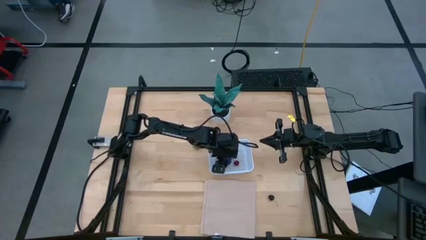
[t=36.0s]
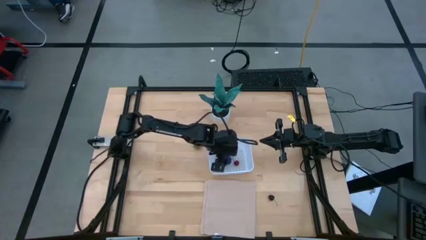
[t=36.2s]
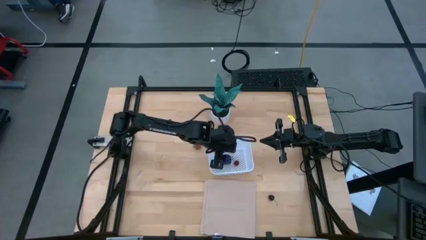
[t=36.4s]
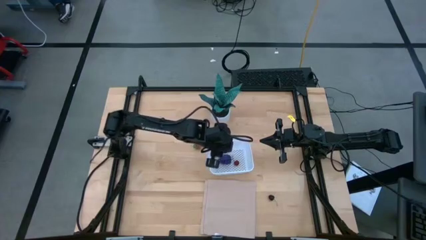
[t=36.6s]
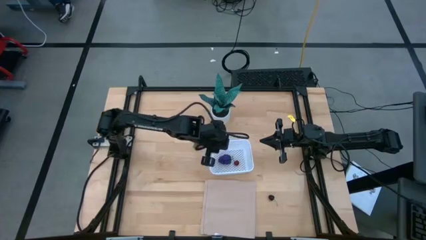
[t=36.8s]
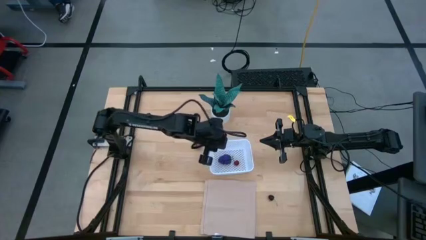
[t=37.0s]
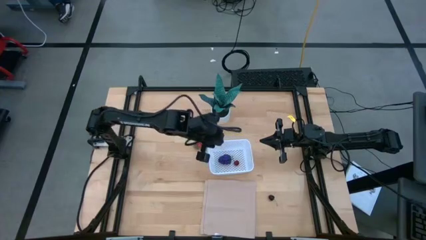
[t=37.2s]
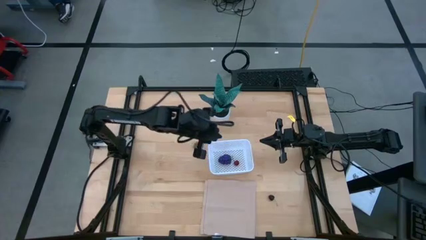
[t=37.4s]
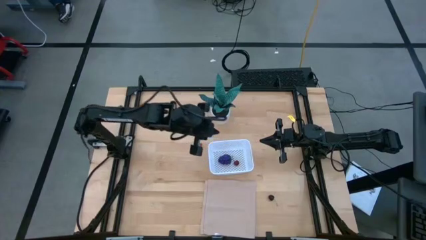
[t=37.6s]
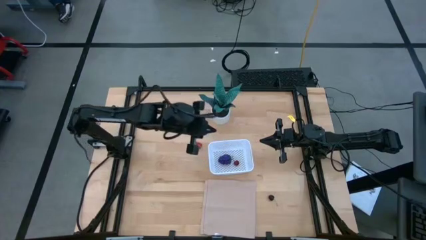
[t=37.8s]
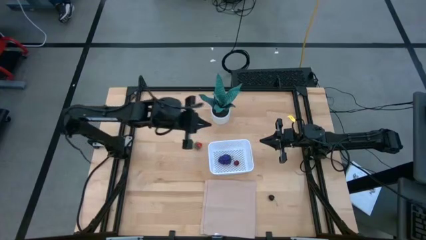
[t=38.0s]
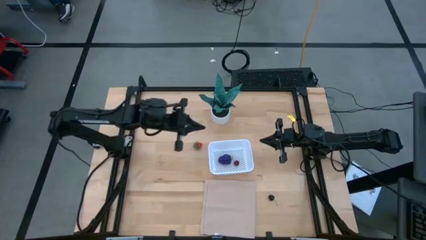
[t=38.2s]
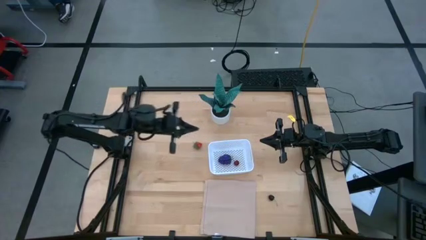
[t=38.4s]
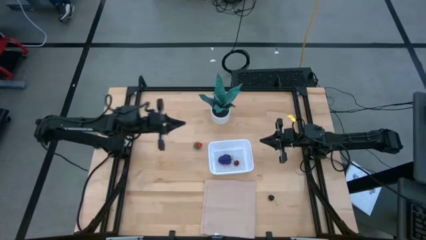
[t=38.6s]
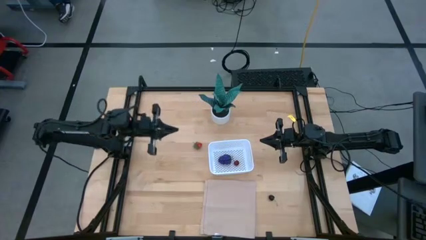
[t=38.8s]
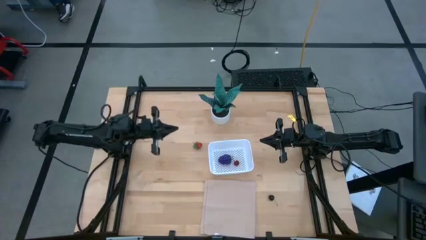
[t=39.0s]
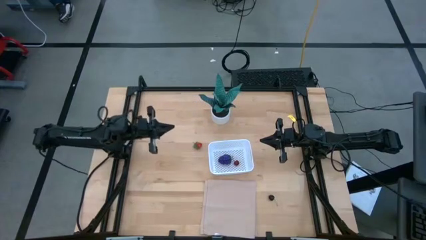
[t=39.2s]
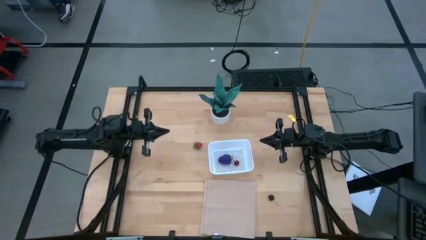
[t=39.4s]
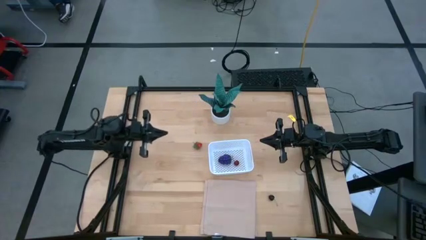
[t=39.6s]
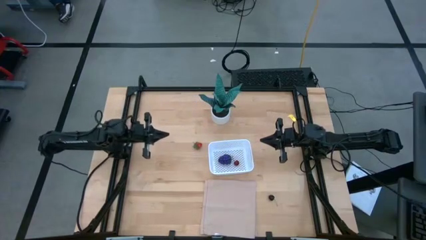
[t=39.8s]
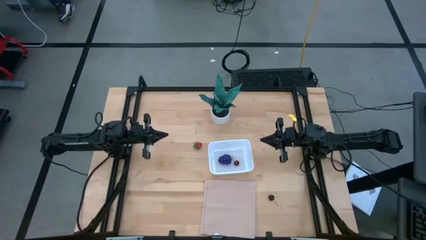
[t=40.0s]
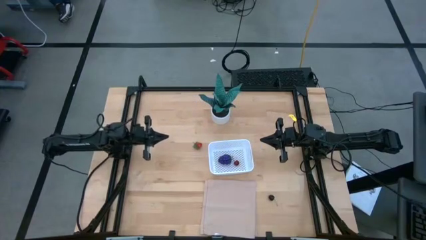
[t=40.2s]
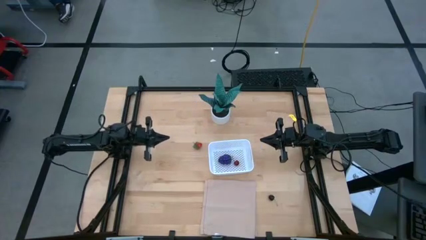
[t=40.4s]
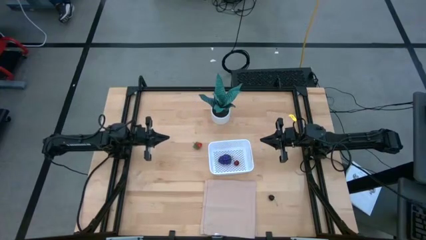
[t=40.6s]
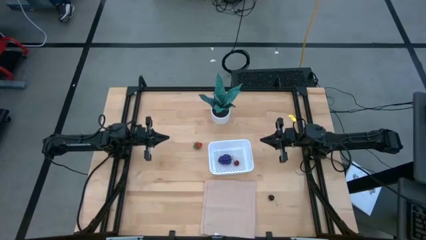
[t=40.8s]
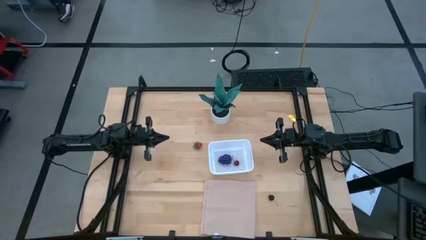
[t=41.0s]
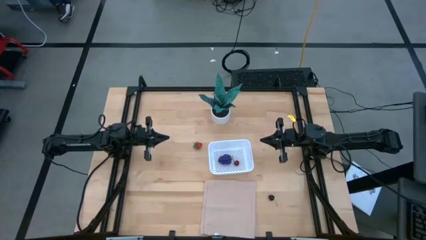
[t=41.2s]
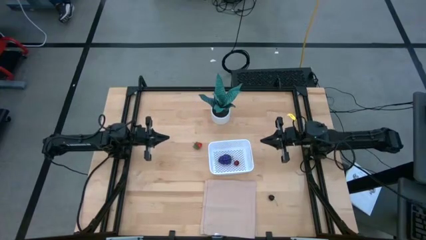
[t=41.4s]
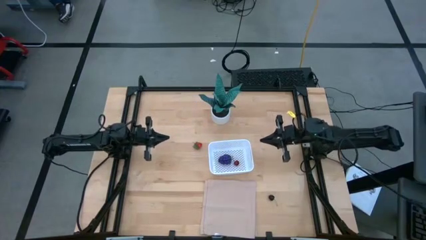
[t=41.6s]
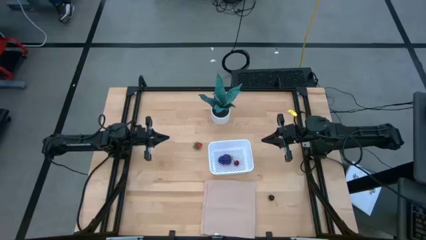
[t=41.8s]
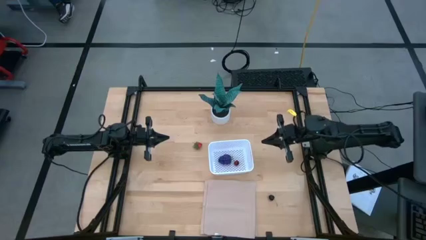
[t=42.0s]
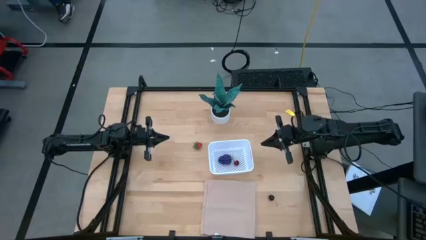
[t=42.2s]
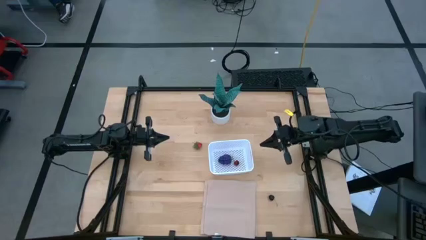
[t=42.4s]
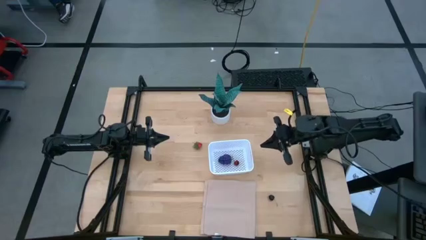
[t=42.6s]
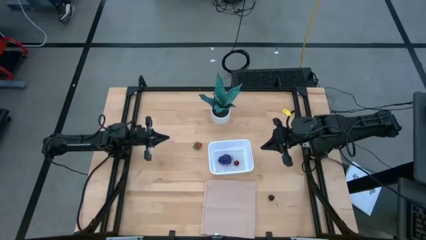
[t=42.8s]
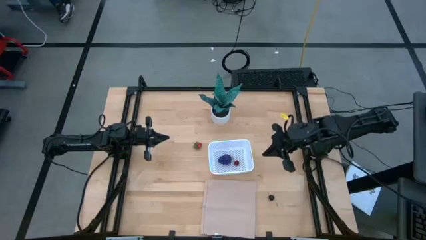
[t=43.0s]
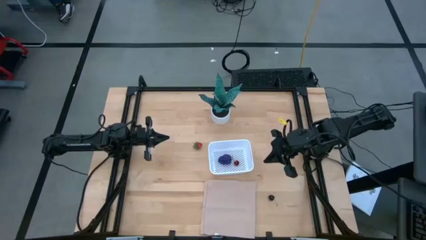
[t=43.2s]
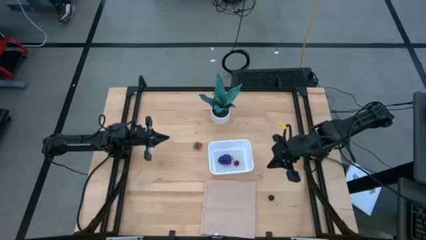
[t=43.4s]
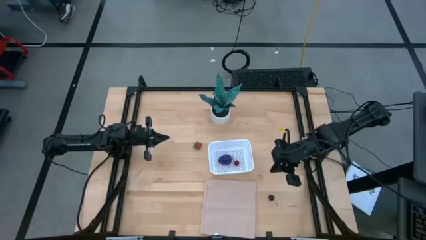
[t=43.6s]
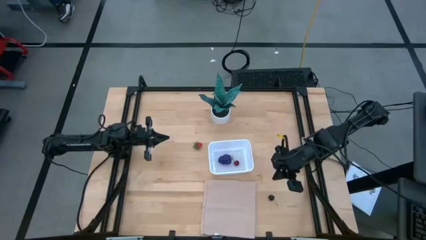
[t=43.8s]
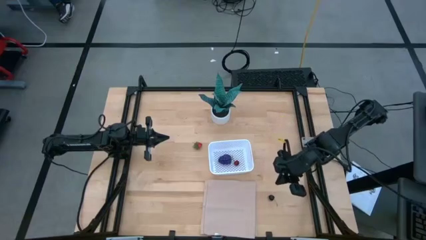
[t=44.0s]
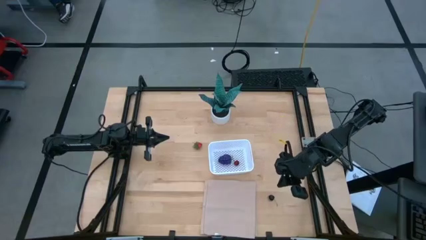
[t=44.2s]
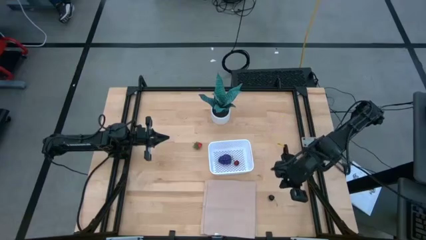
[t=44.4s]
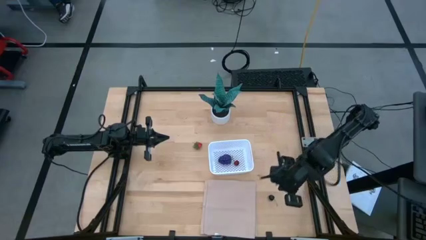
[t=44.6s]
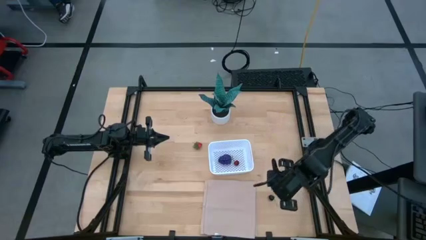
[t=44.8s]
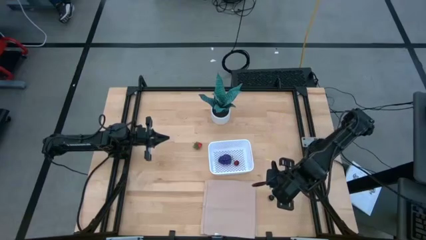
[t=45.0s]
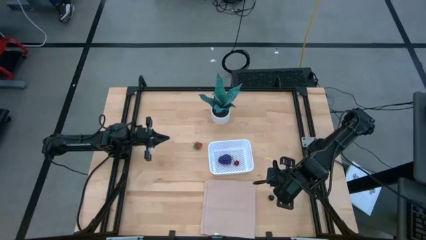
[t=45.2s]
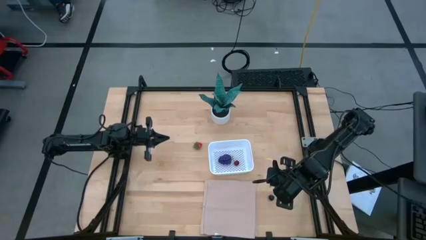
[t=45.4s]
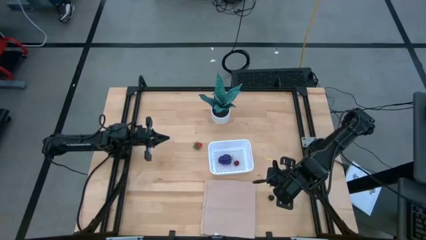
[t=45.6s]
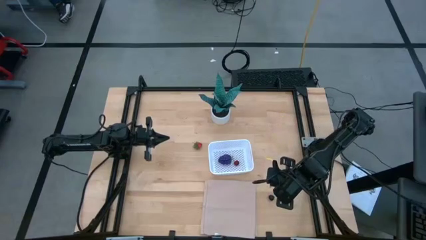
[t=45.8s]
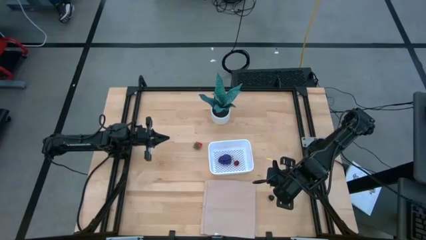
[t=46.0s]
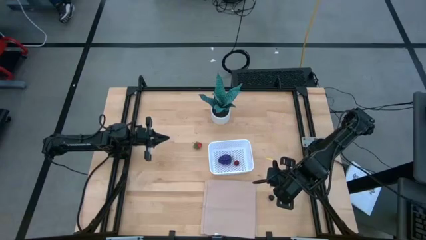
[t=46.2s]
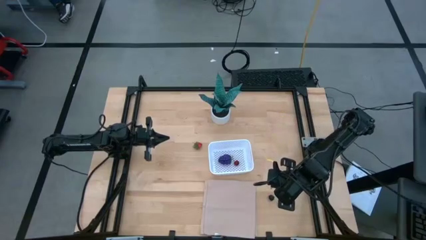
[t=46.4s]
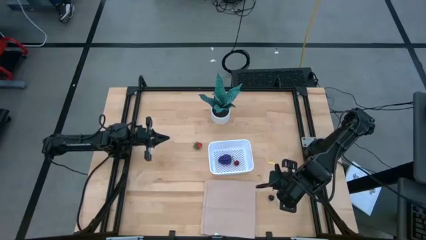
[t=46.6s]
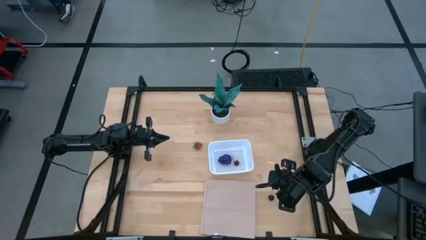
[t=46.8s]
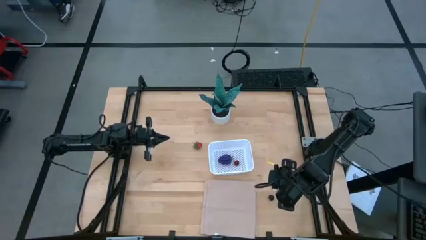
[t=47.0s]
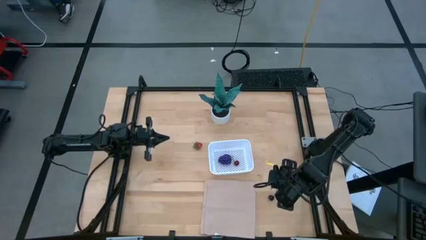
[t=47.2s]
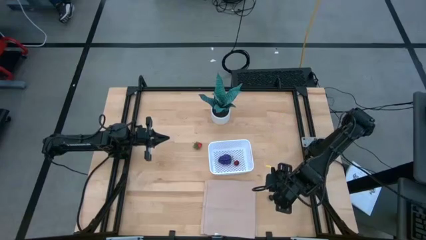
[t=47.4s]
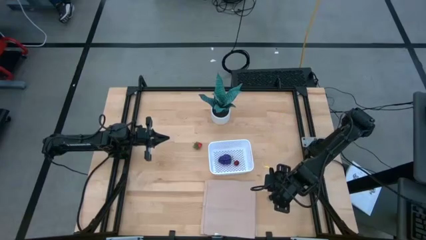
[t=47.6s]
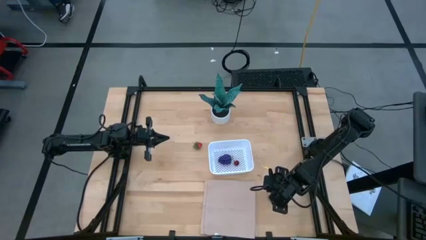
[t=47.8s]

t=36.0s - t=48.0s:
Task: Pick and placing Produce into tupperware
Put the black cherry into the basket
